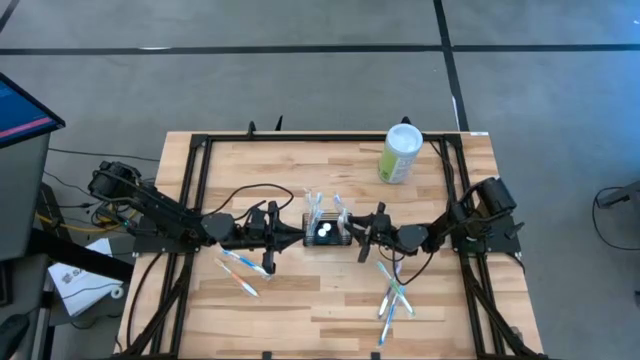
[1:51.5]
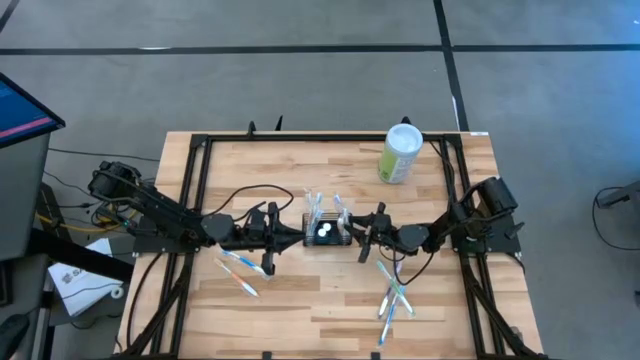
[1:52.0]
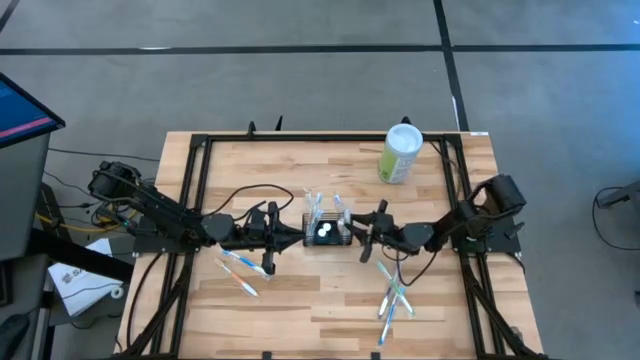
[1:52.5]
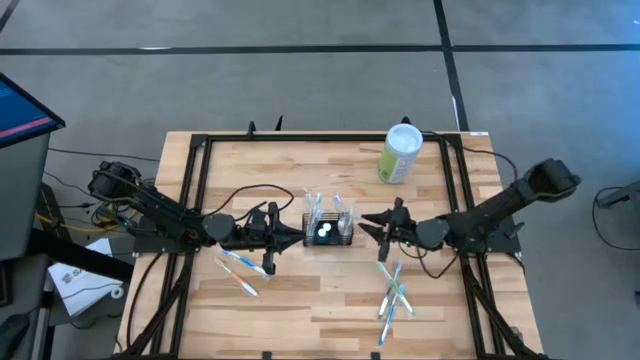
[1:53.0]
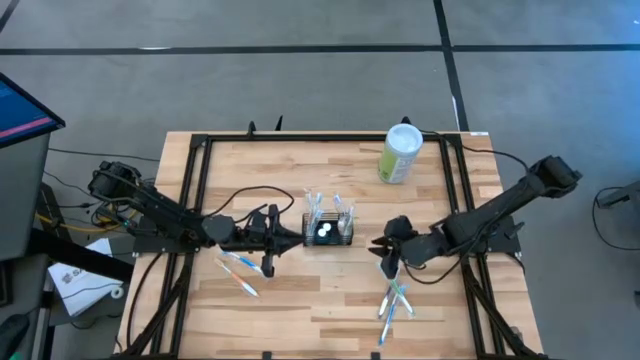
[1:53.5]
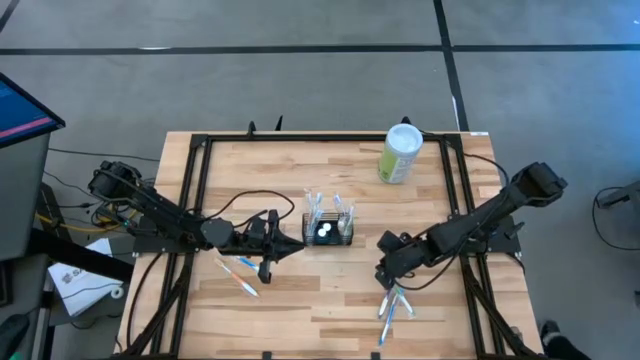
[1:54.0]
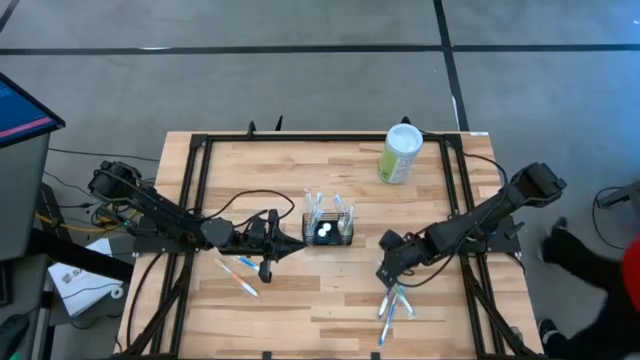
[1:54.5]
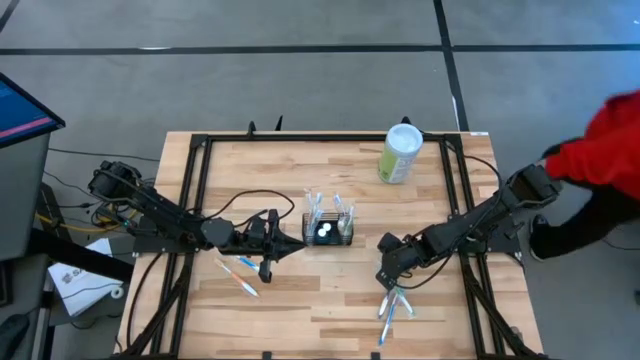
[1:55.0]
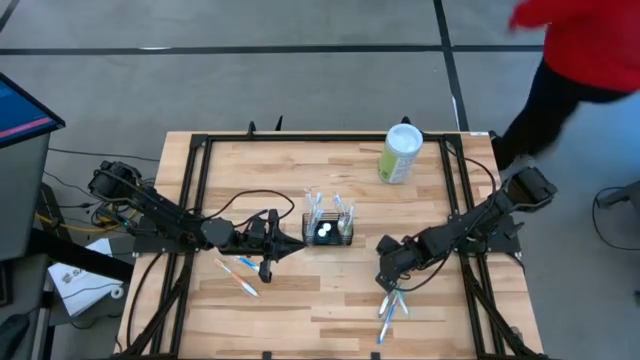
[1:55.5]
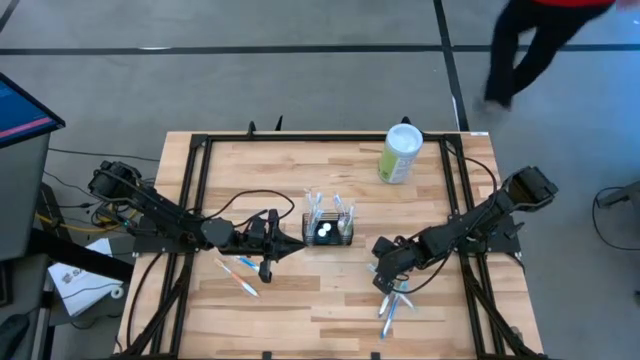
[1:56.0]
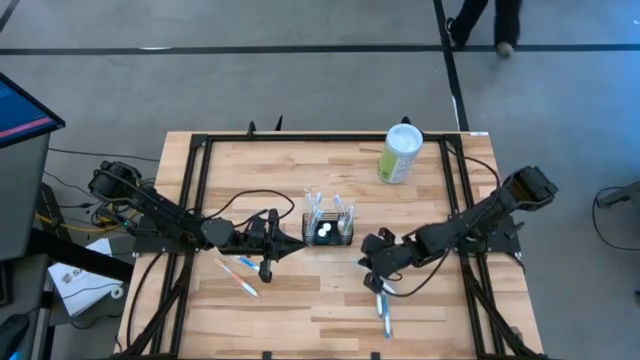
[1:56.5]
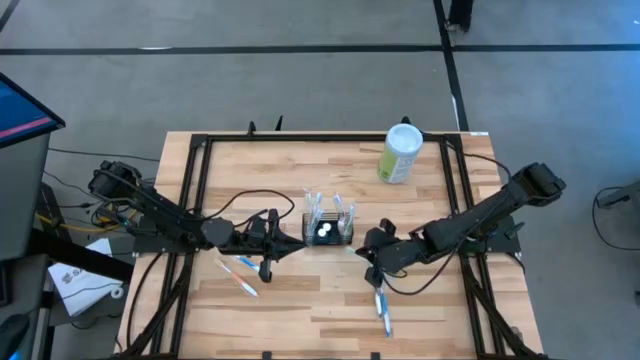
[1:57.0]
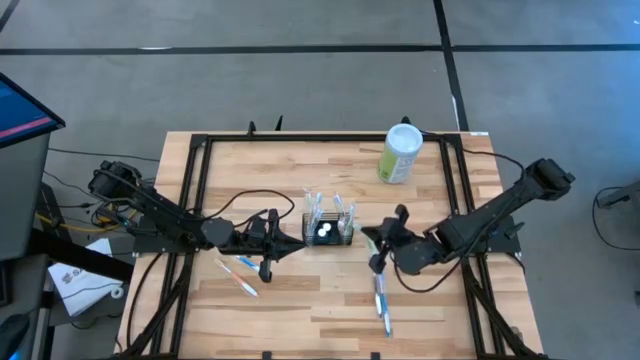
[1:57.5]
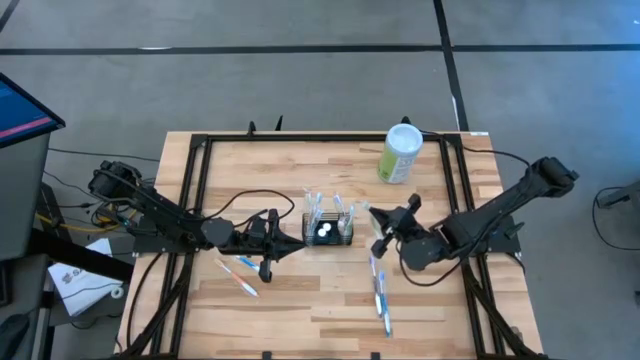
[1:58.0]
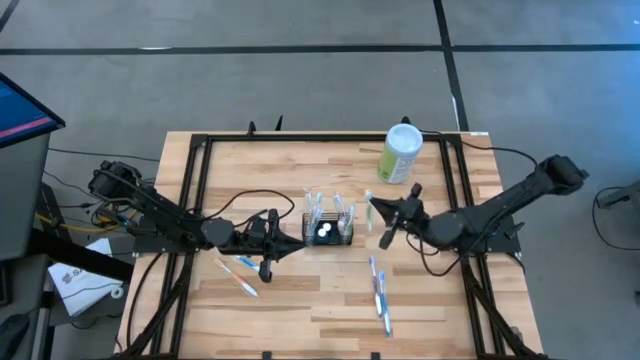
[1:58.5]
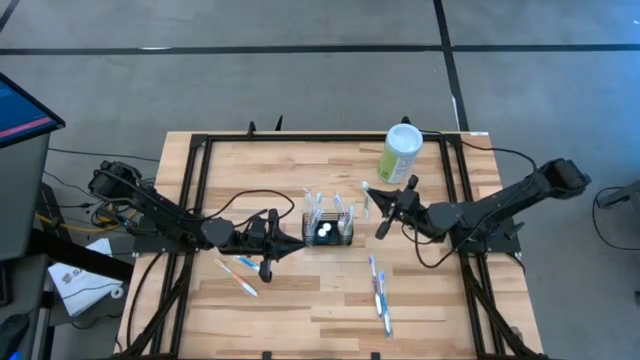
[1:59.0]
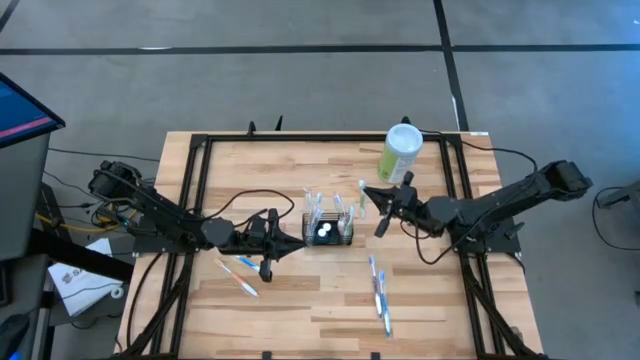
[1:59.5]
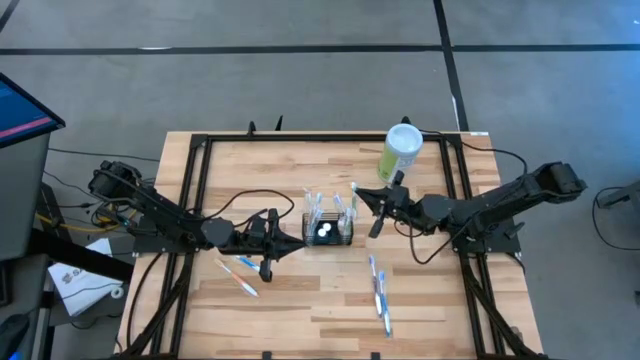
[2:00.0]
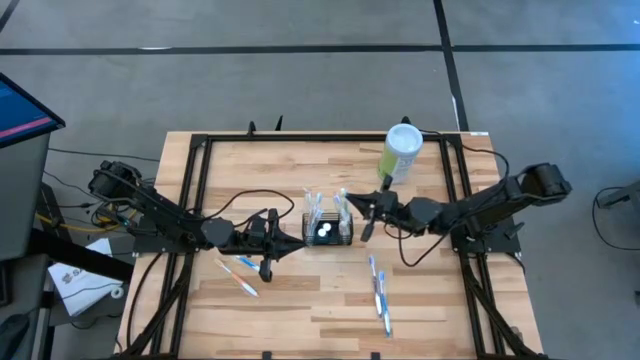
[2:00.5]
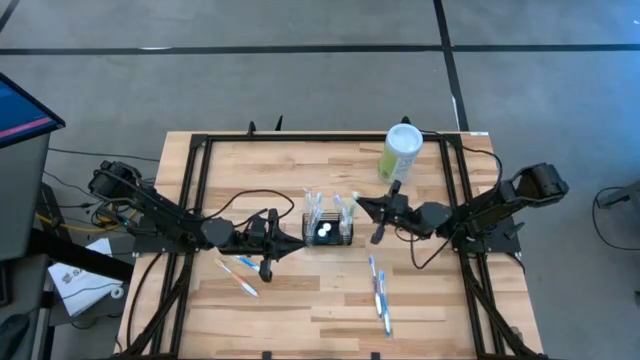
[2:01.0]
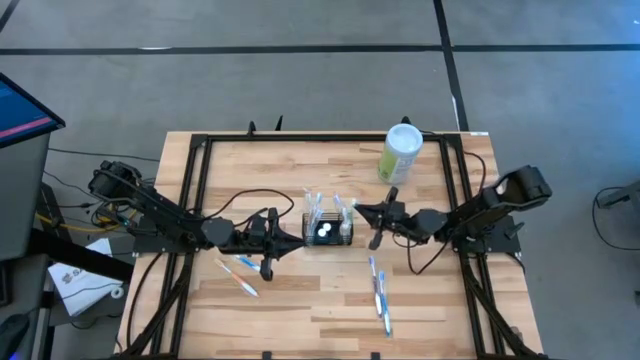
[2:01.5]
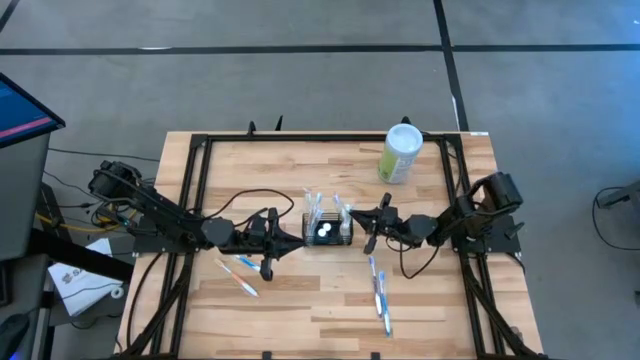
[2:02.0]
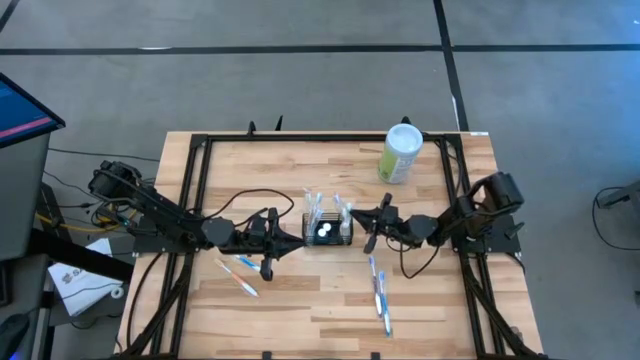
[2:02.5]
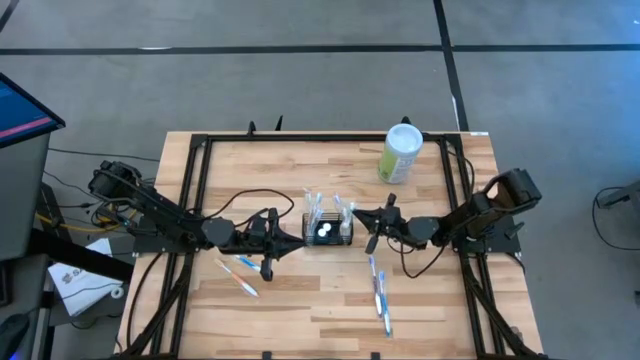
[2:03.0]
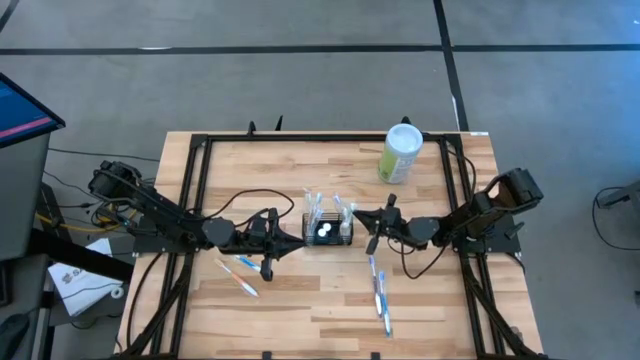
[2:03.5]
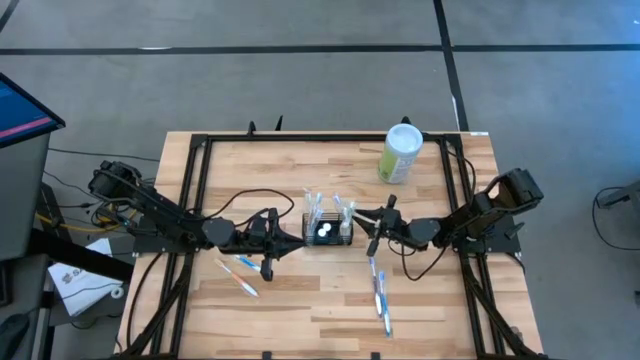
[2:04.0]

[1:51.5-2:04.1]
Task: Pick & Place toothbrushing station
Put the green toothbrush into the right compartment of the organizer

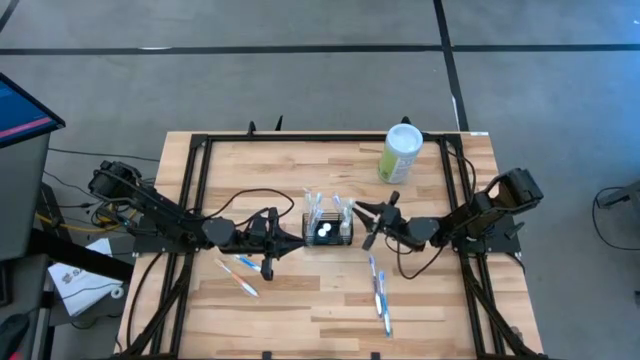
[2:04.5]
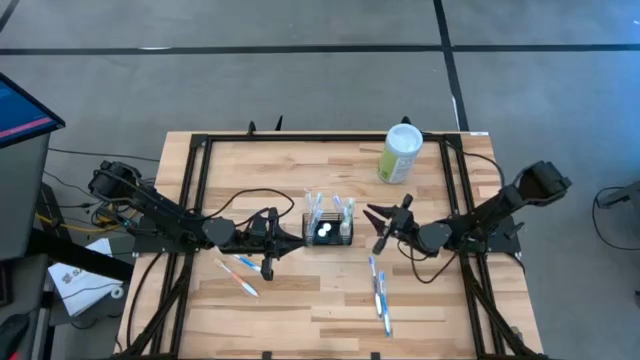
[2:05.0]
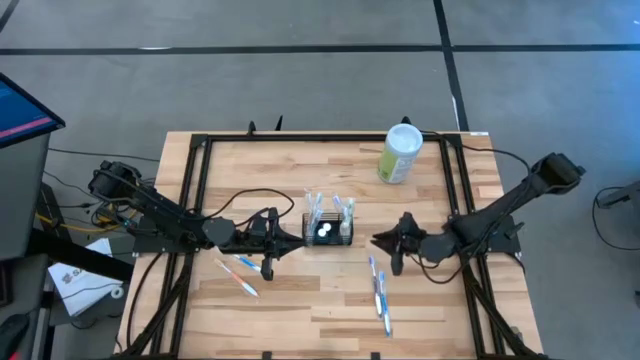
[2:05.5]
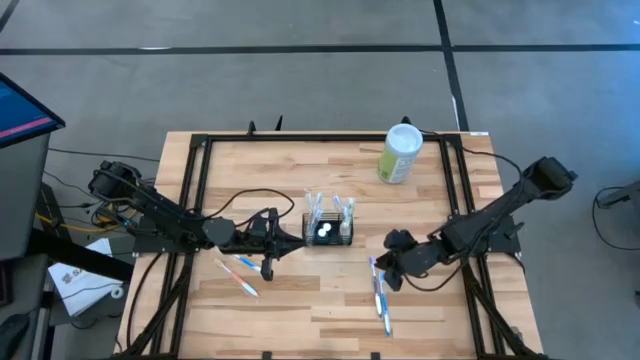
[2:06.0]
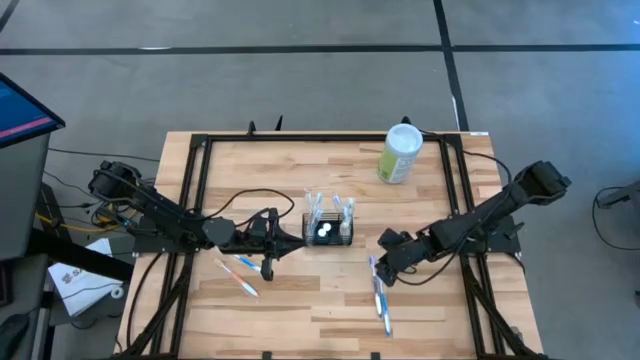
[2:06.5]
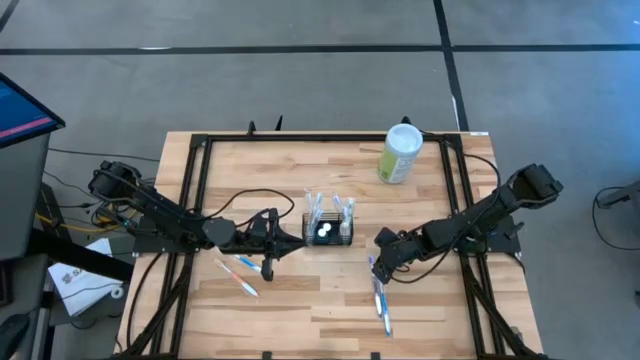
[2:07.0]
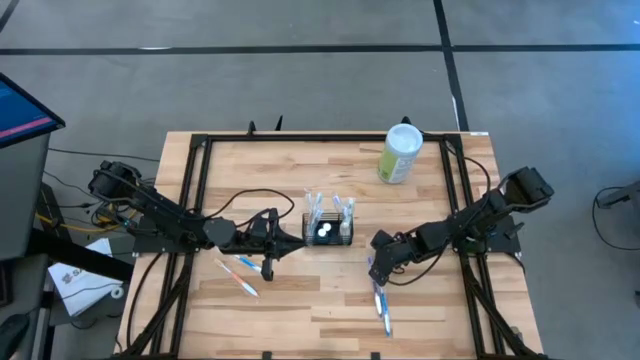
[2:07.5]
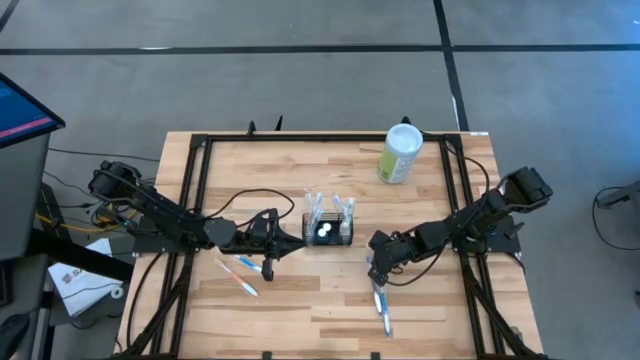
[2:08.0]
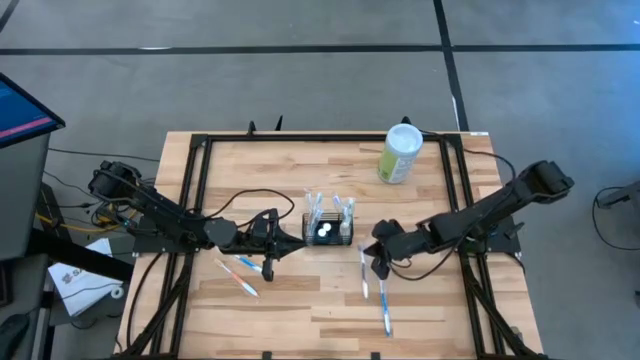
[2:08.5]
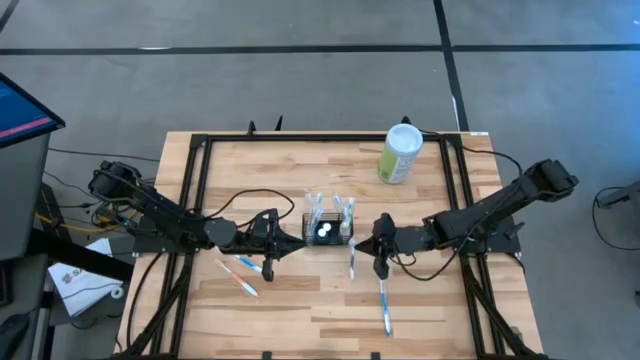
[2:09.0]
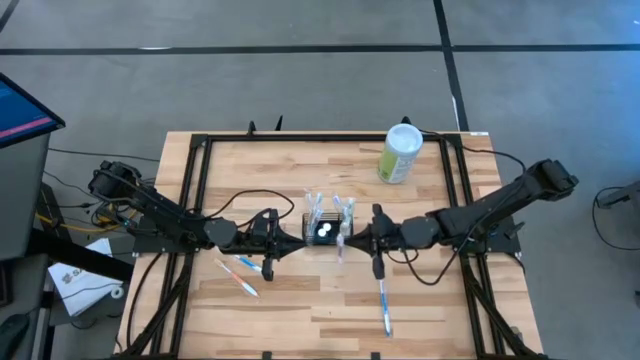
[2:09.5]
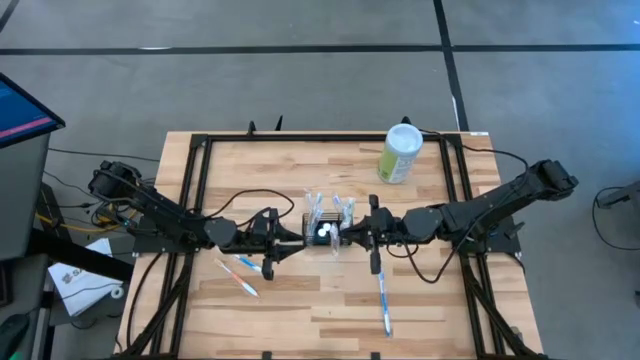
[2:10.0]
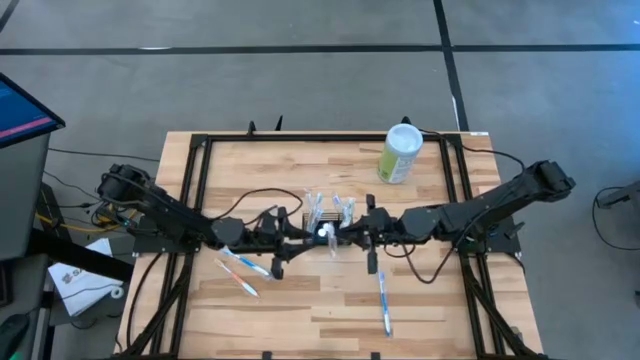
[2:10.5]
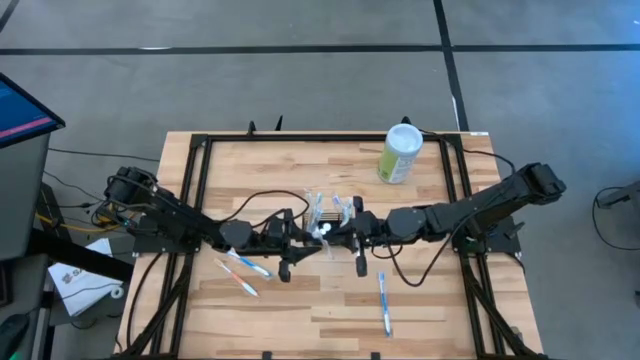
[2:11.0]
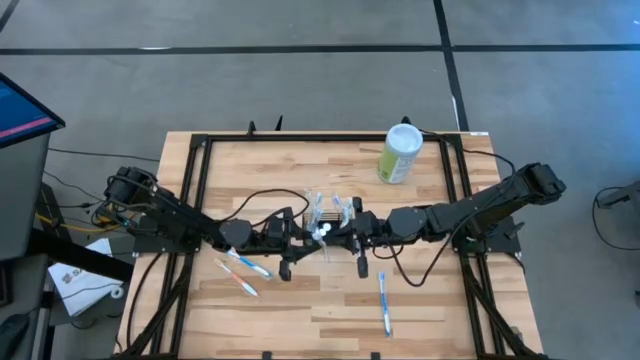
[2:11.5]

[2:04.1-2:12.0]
Put the purple toothbrush into the left compartment of the organizer

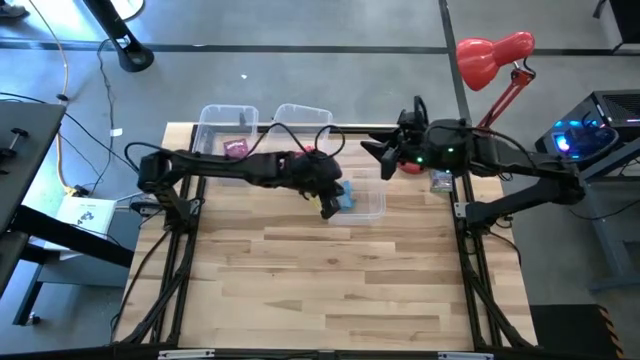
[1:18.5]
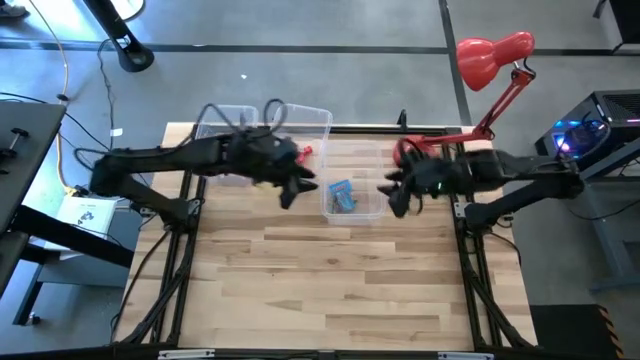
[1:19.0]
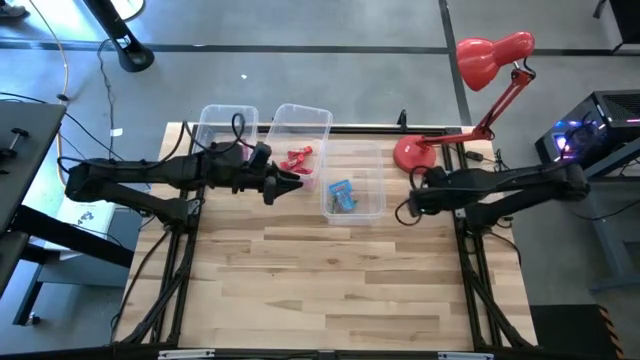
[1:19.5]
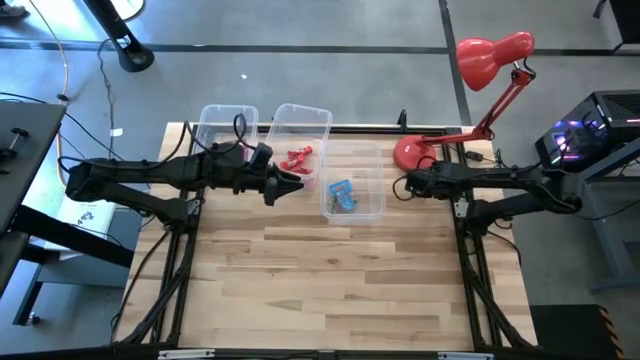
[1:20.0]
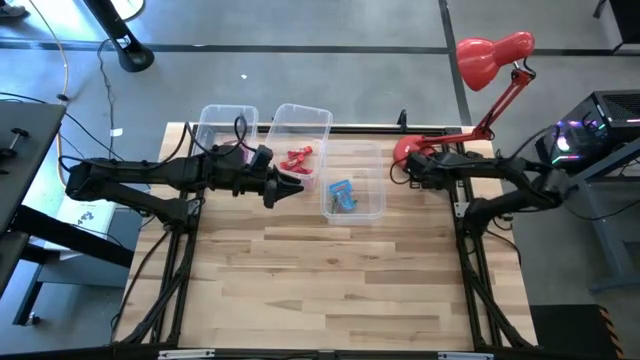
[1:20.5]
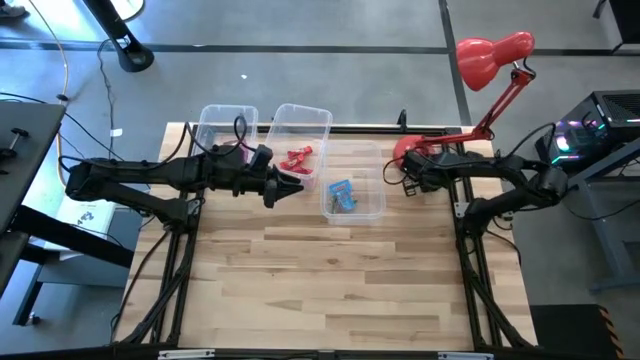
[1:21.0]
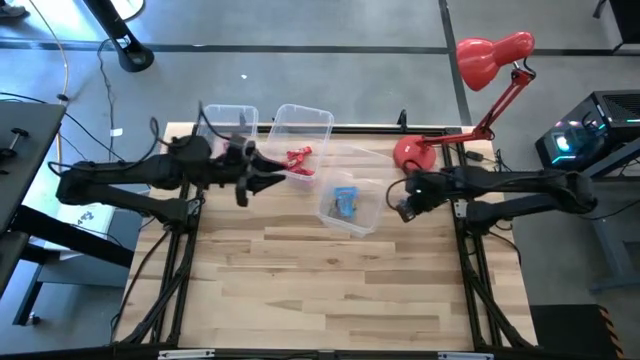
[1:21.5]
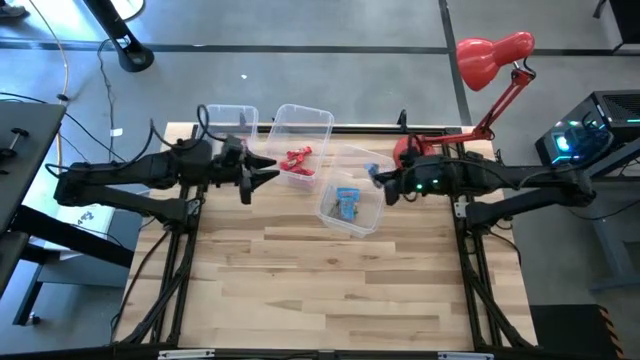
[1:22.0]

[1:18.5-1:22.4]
Task: Sort candy
Put the blue candy bag into the right transparent bin
